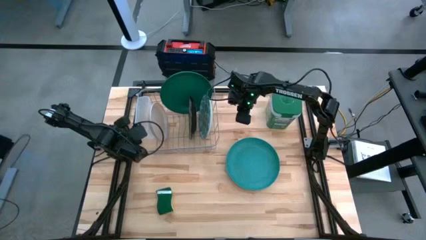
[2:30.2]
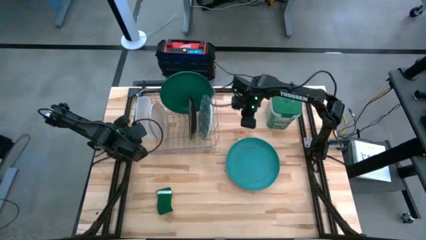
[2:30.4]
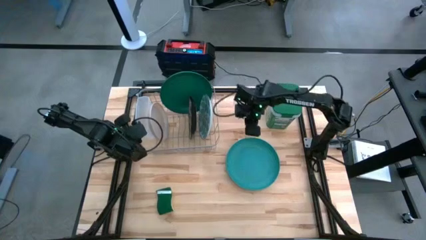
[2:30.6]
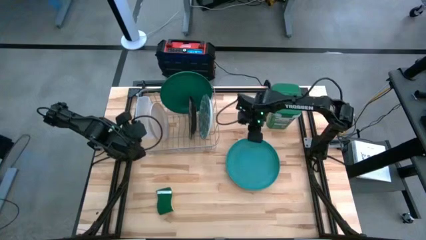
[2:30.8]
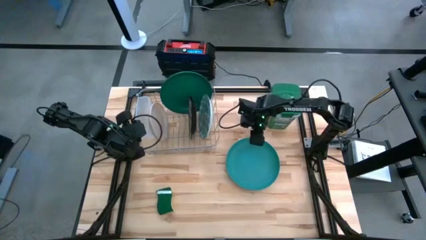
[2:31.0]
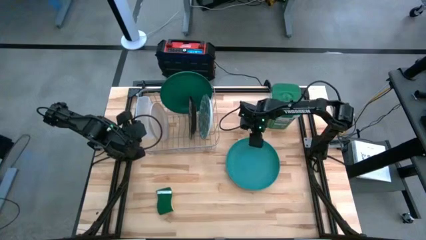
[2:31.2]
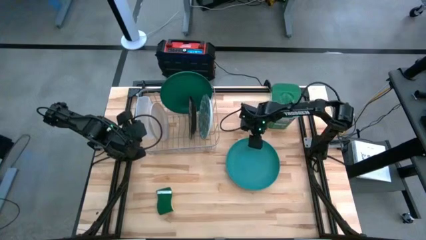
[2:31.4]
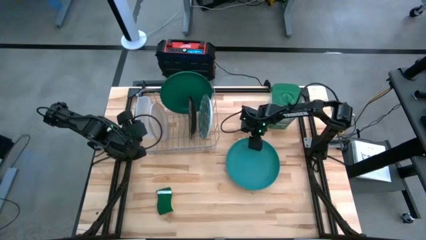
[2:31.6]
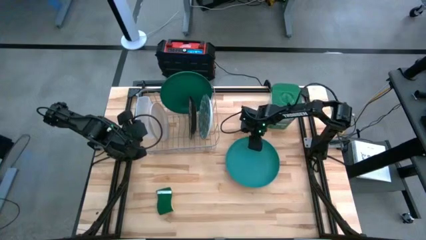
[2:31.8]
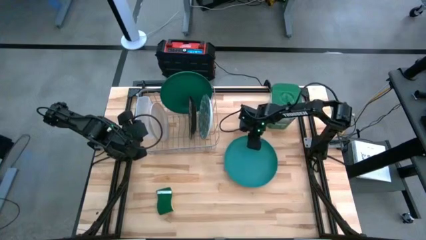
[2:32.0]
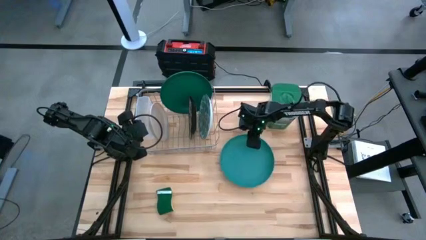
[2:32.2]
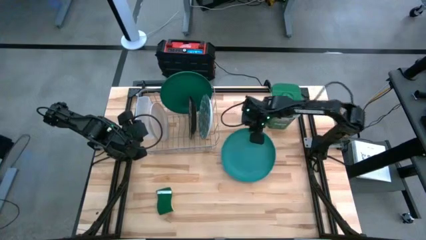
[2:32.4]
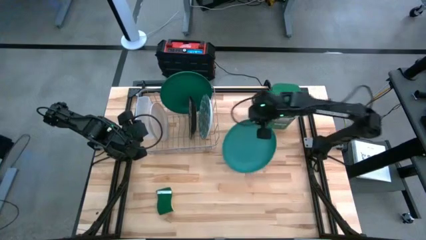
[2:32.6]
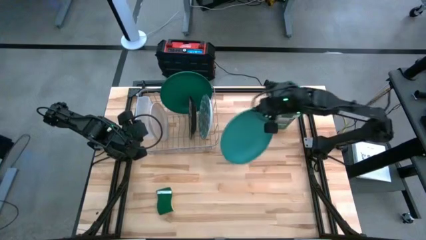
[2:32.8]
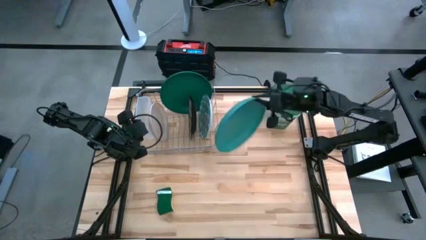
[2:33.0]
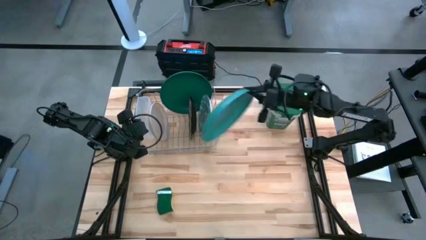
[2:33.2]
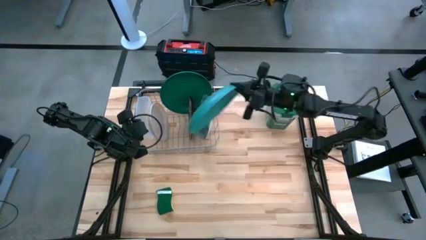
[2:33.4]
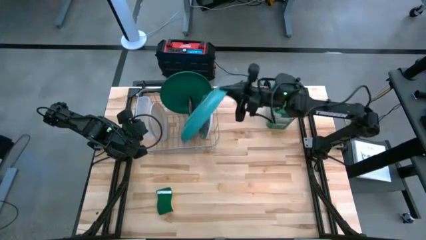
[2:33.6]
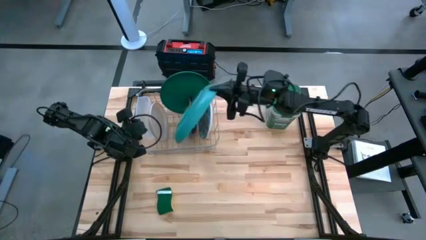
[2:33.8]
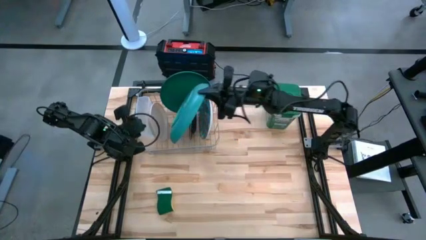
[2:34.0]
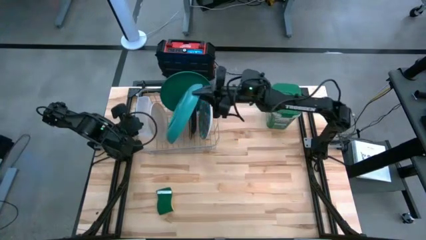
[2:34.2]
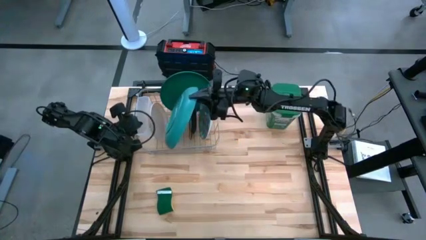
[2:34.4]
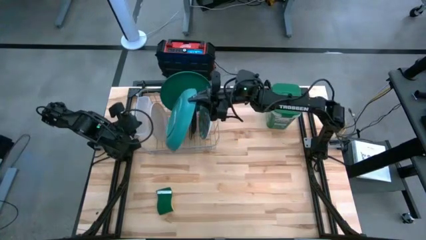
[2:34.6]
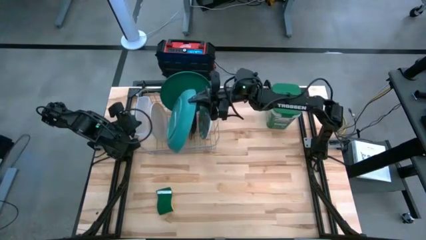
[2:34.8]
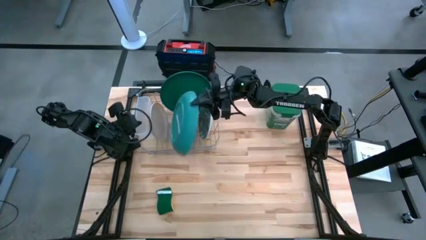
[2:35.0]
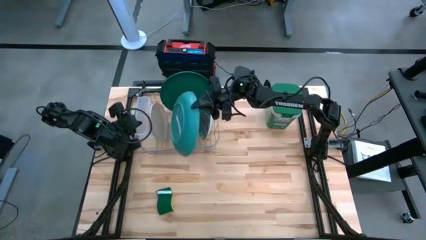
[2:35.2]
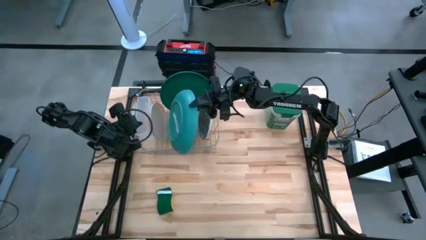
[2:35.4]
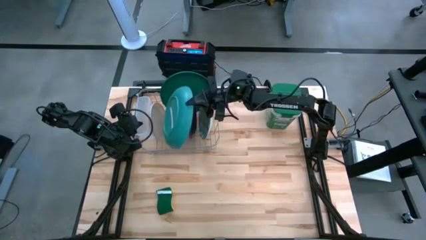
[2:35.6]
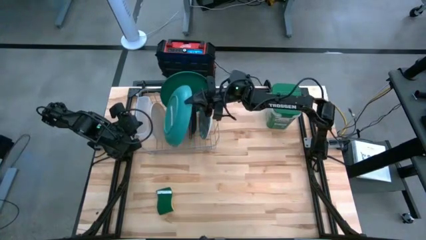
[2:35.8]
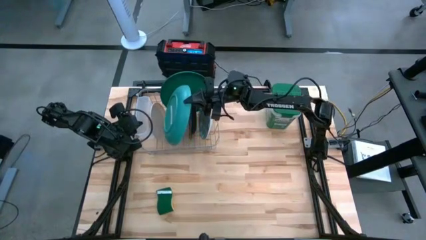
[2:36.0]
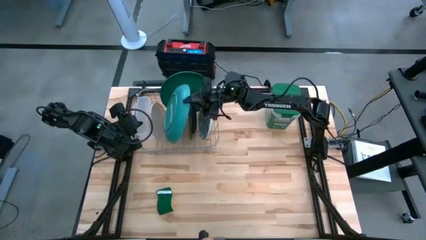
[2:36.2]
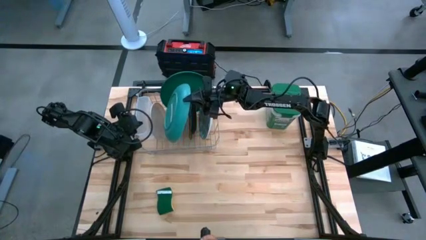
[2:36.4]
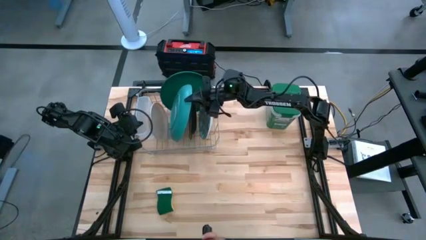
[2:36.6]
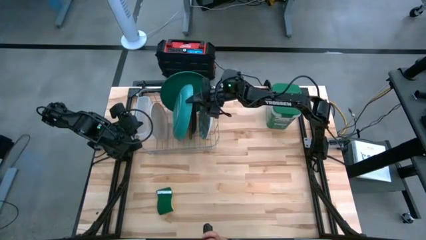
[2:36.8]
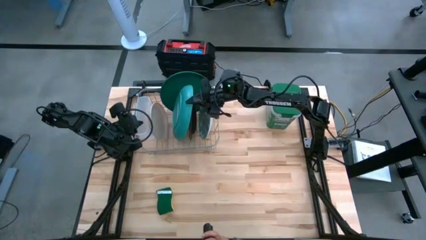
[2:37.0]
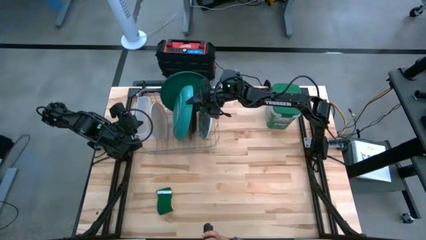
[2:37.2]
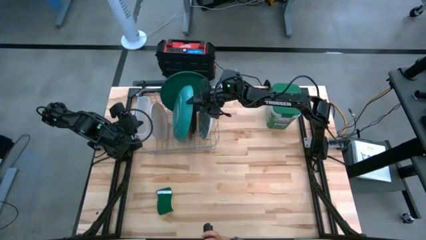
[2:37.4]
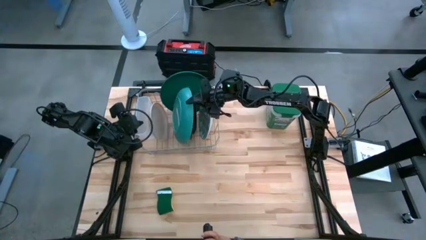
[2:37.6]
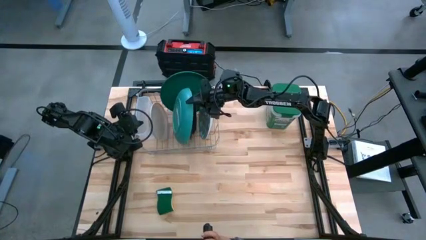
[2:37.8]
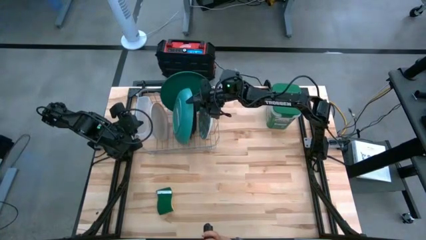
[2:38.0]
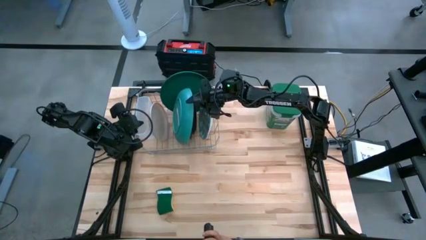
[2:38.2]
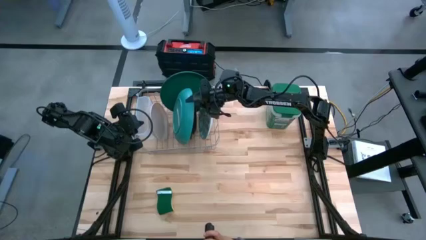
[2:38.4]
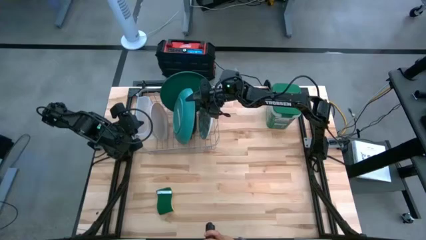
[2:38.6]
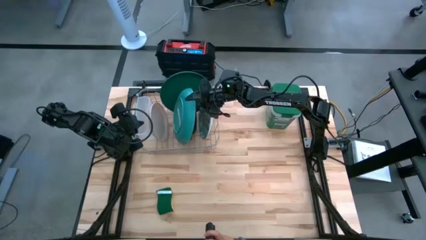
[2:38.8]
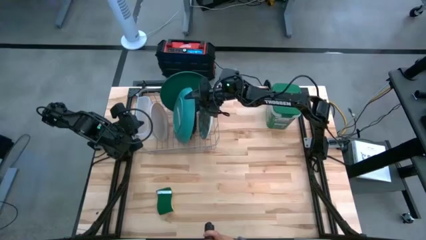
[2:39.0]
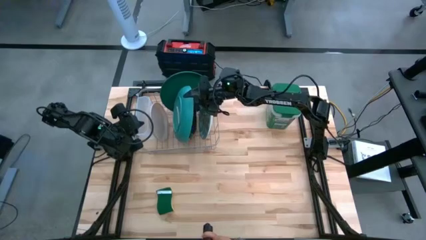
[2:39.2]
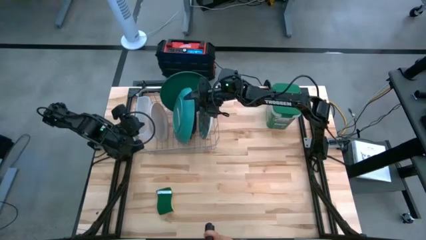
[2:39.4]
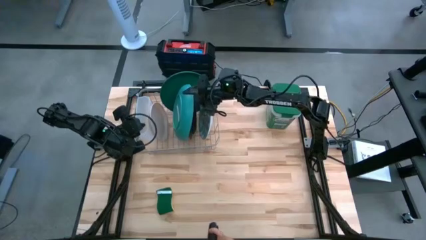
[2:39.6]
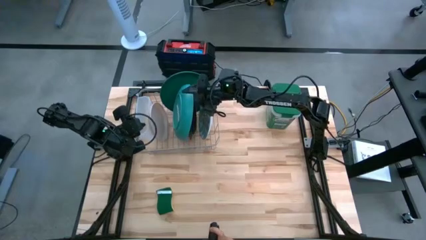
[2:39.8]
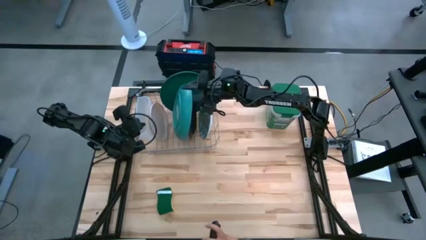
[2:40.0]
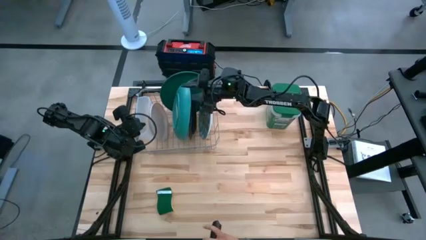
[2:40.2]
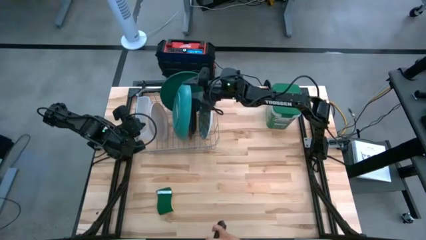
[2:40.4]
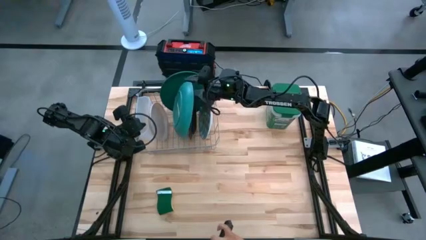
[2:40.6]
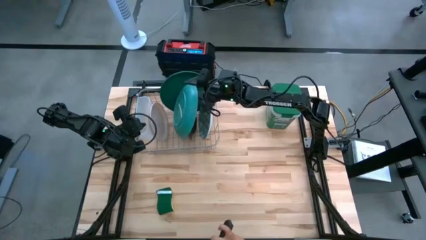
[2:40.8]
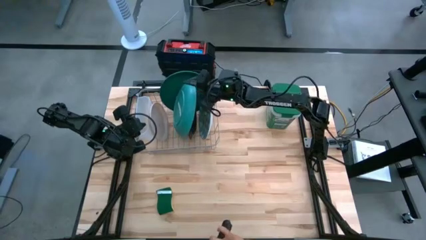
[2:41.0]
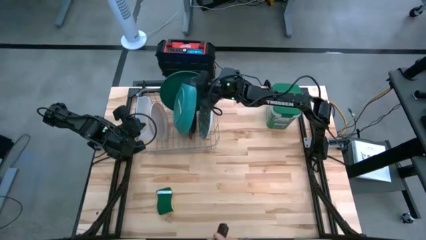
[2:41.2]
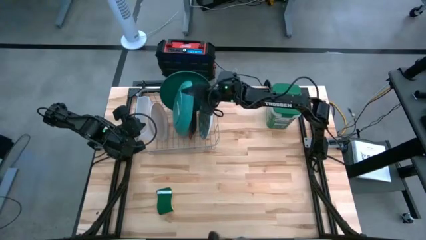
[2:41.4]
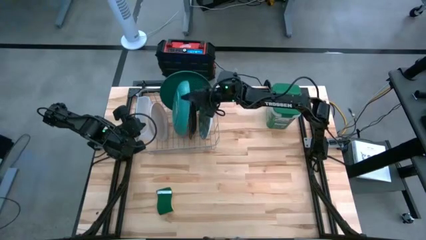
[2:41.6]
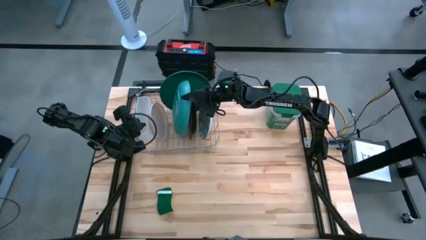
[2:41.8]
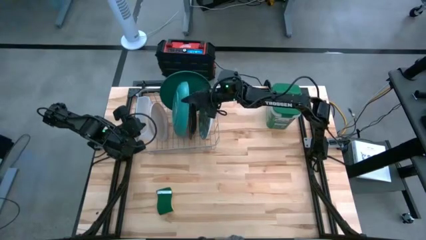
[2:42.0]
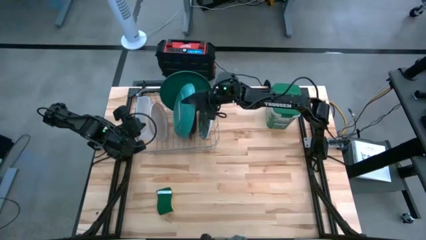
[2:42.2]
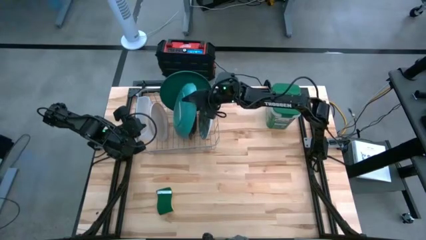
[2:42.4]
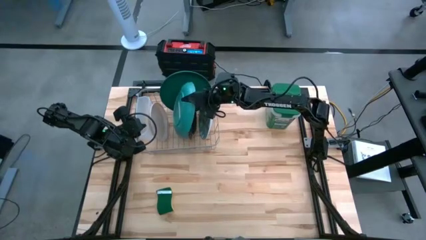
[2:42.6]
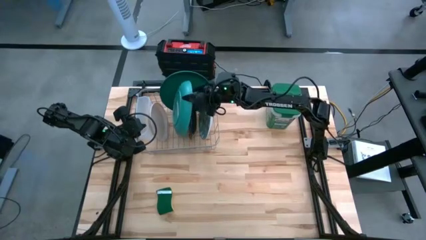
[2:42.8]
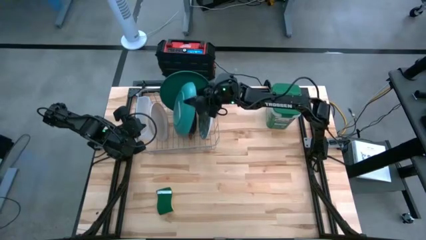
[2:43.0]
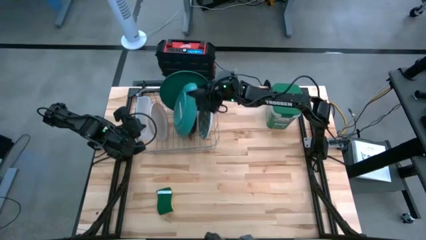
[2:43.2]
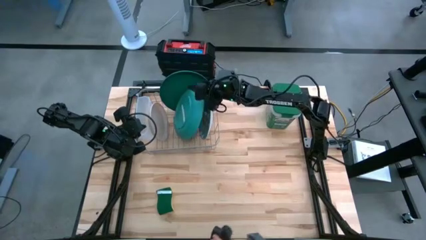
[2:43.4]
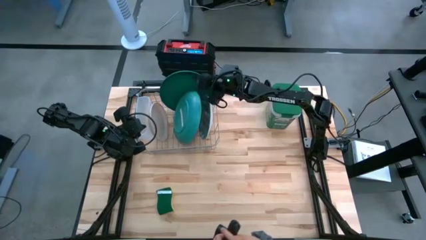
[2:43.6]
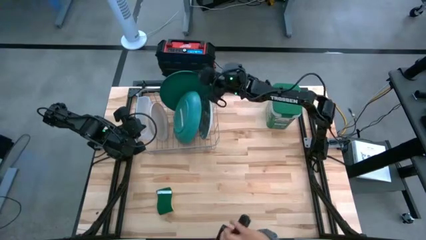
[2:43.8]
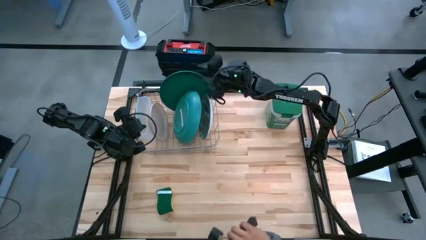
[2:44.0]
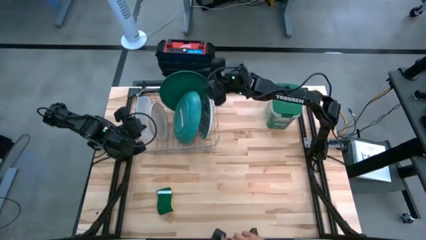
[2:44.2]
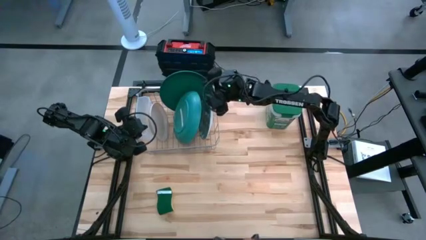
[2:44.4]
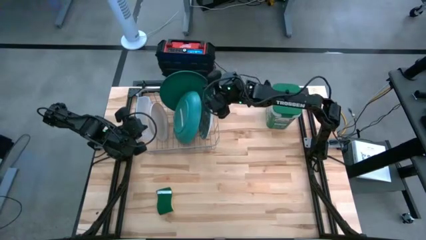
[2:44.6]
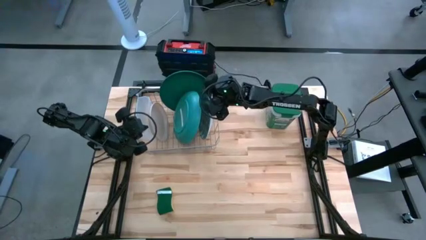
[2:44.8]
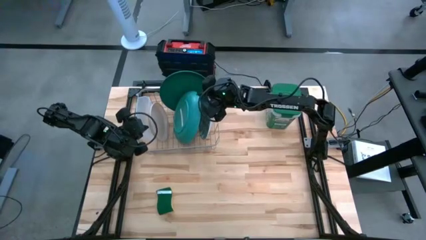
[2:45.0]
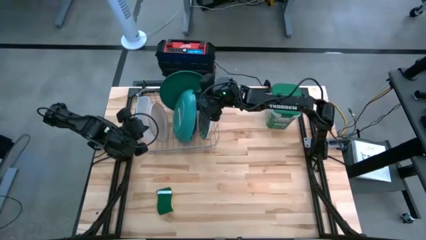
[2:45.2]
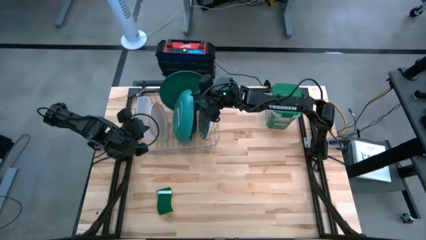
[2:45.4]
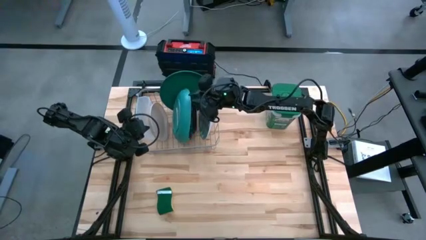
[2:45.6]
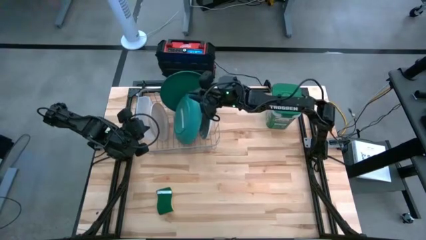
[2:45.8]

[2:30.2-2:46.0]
Task: Sort dishes
Put the light blue plate on the dish rack

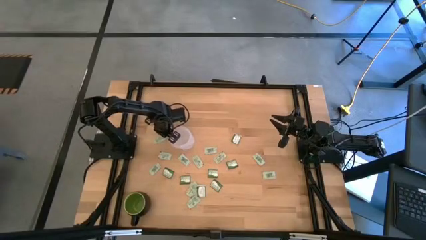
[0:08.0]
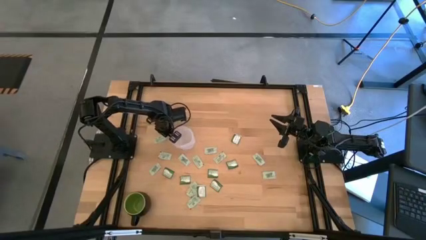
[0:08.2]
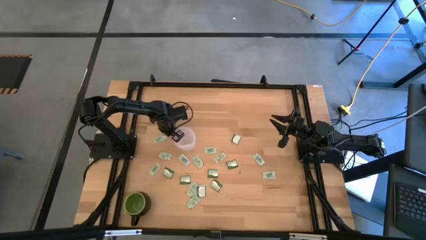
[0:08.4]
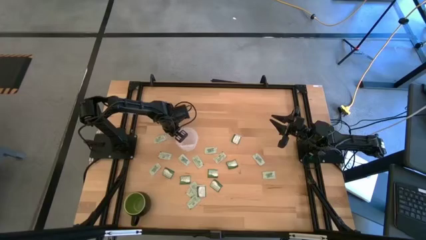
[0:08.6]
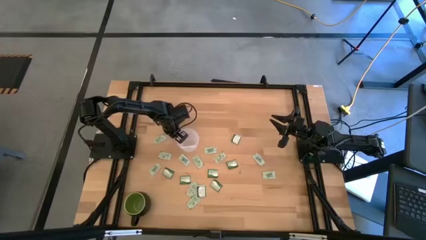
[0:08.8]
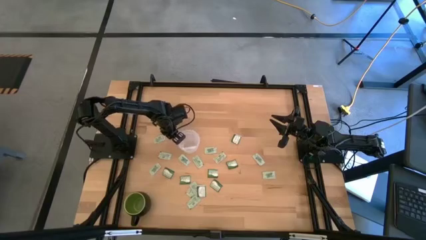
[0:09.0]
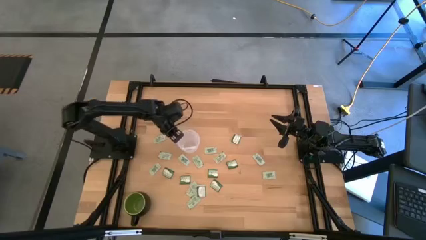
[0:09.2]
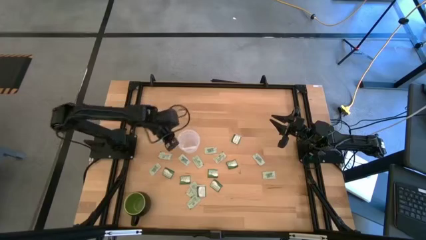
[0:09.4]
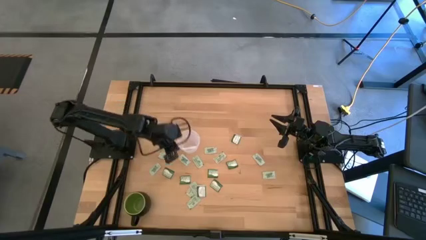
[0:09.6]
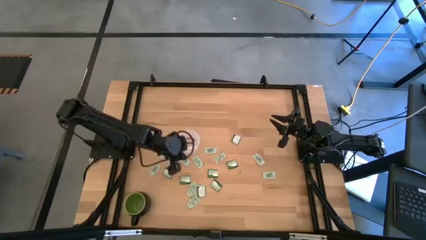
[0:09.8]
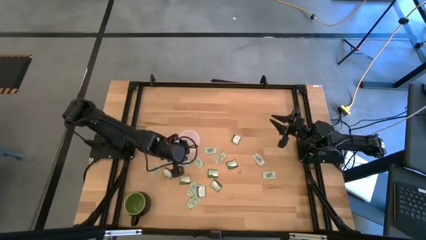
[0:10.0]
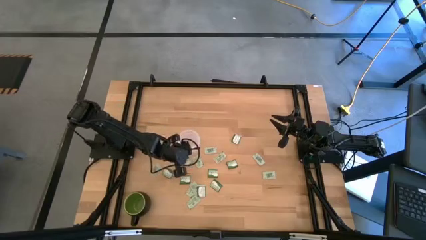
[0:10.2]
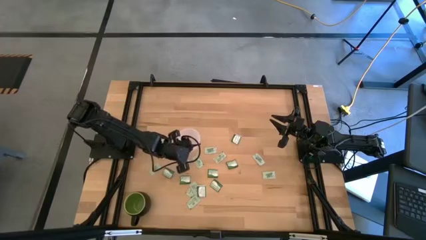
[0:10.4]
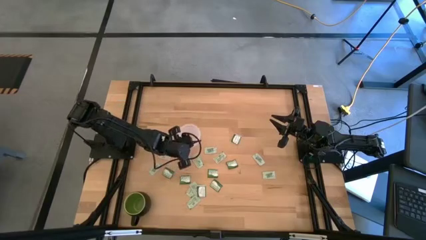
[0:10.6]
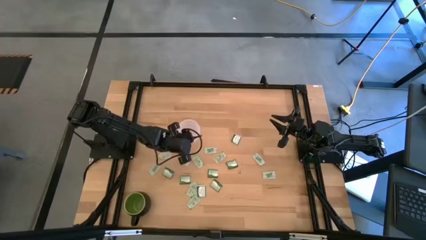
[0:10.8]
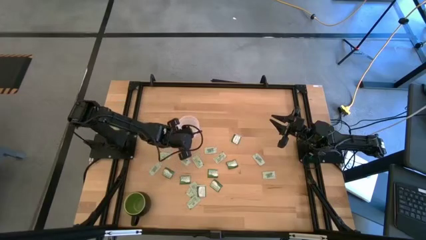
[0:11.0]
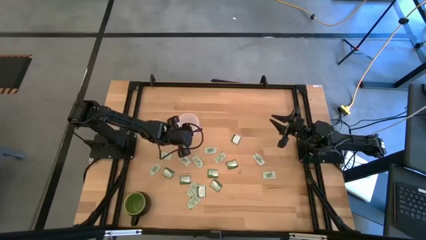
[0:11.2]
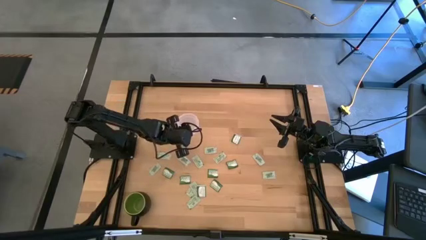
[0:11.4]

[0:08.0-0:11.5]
Task: Pick and place Stevia / Truvia into bins
Adjust the transparent container
